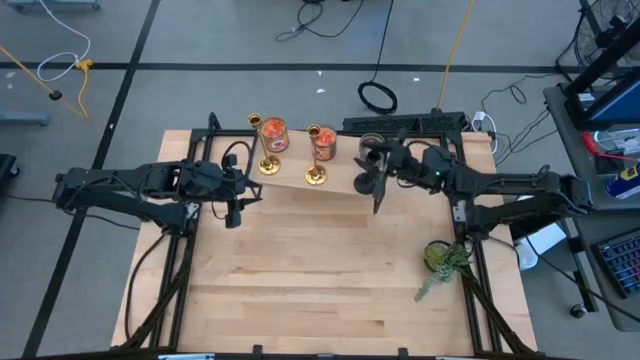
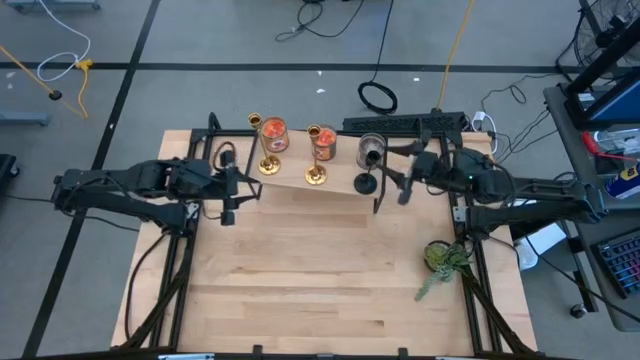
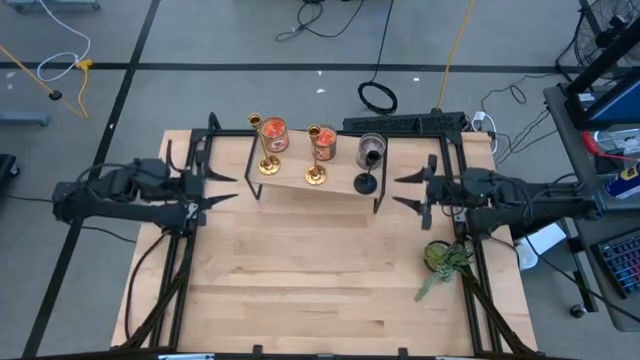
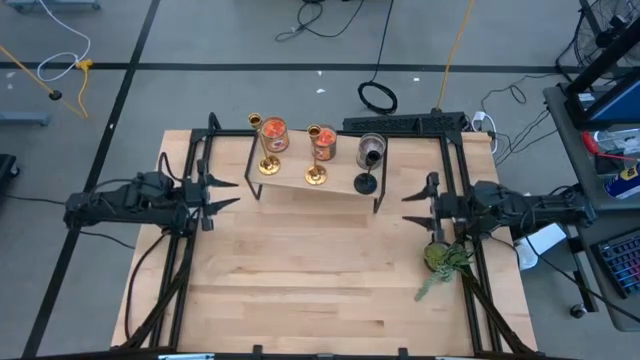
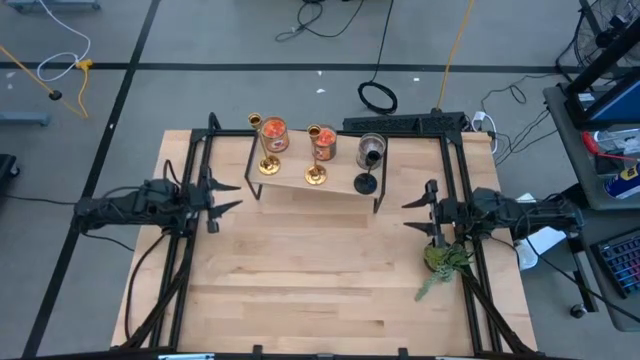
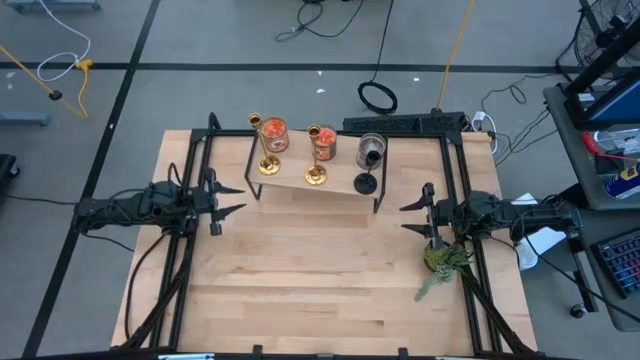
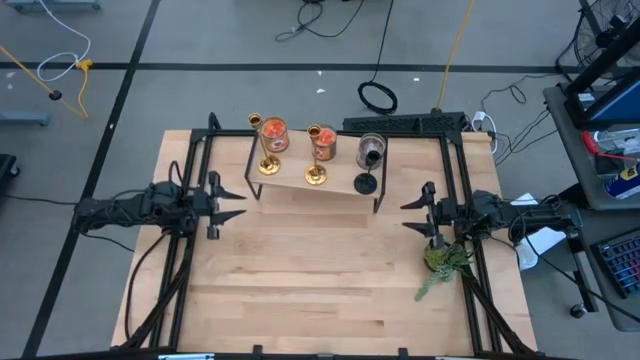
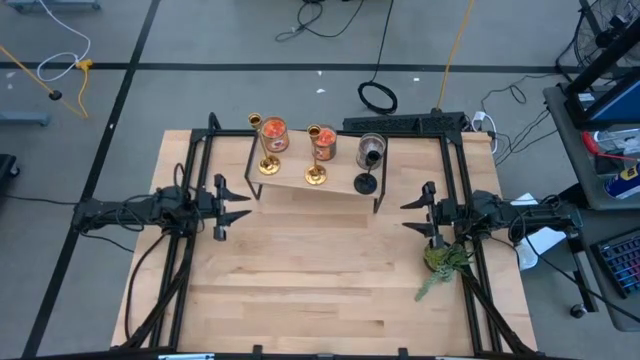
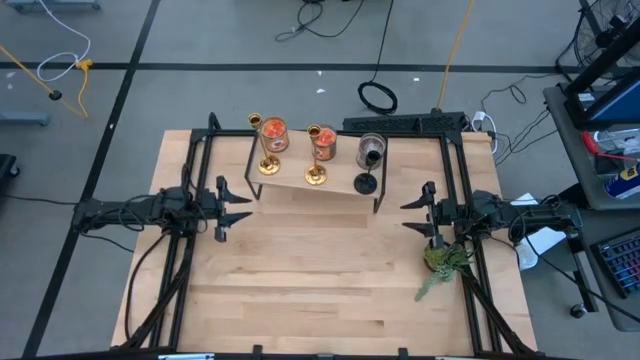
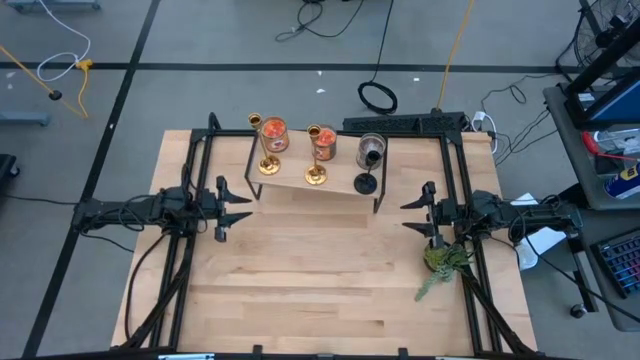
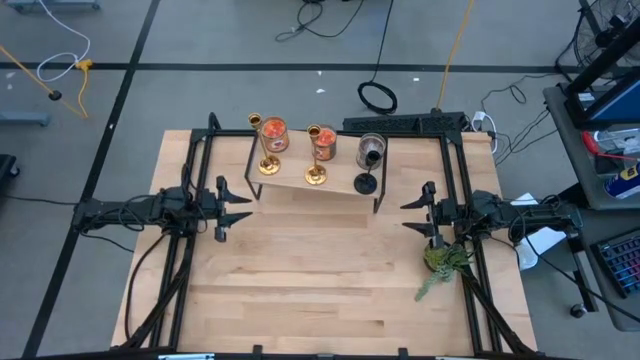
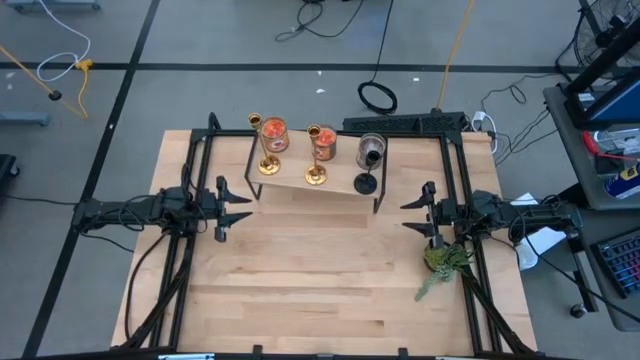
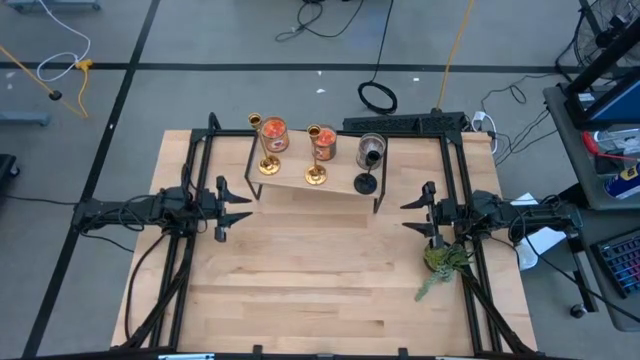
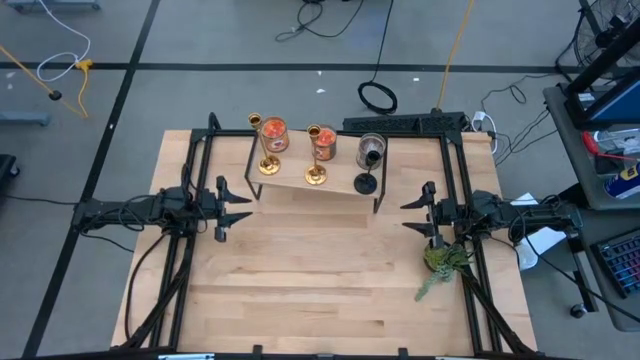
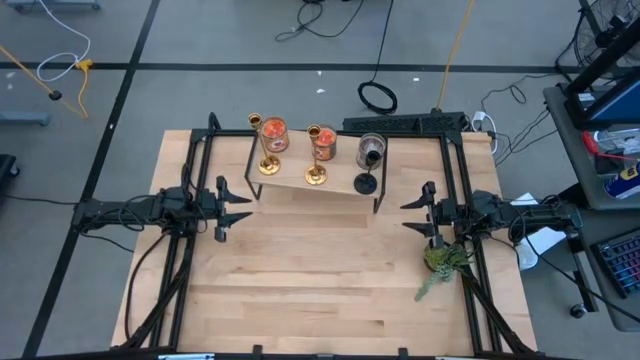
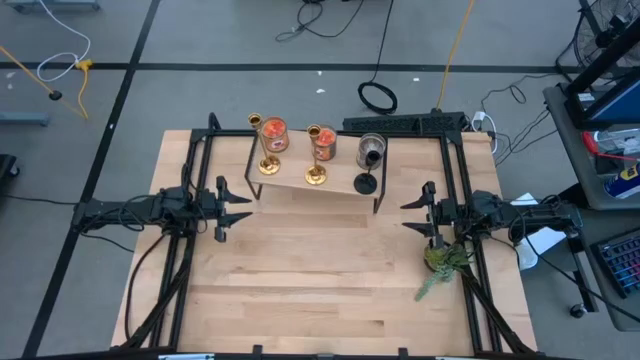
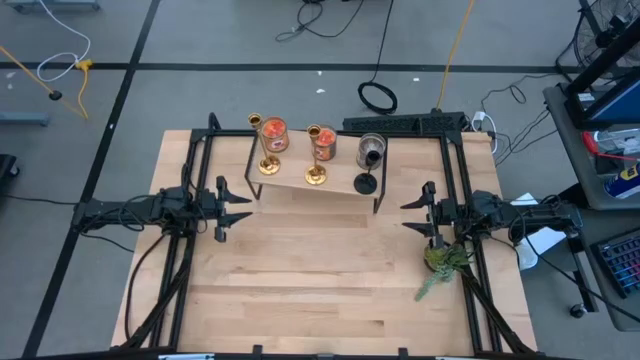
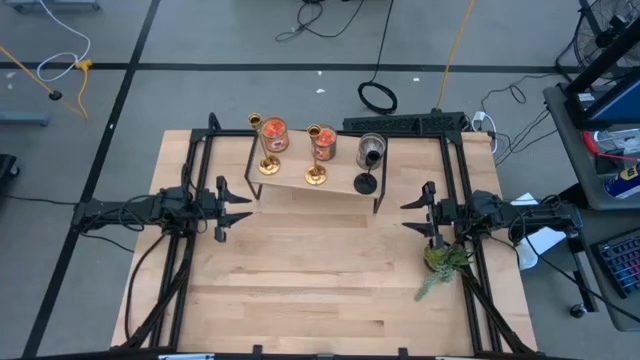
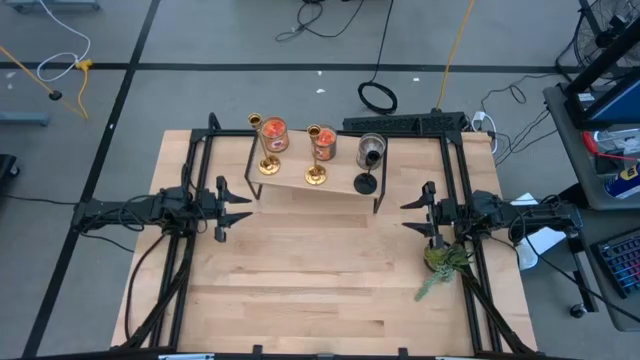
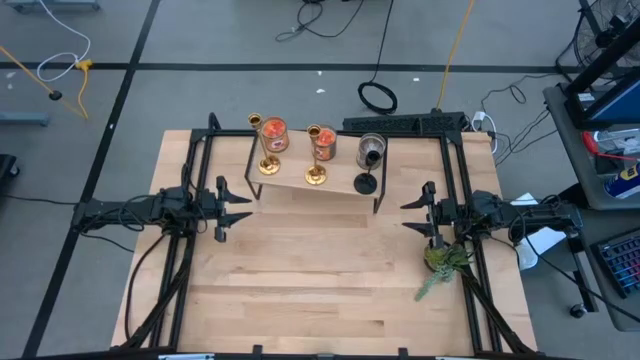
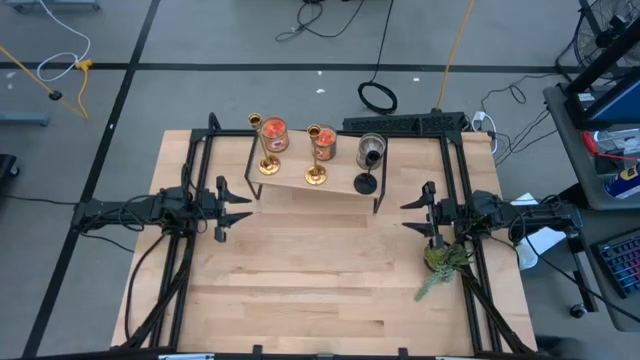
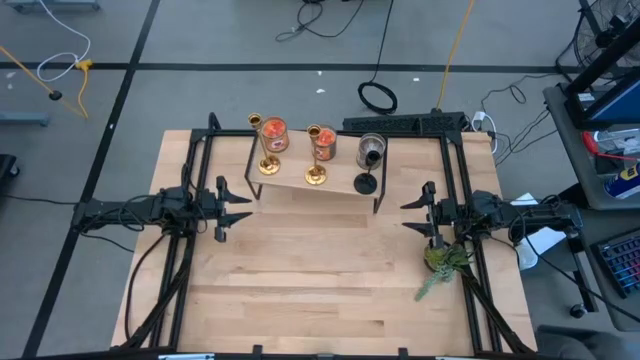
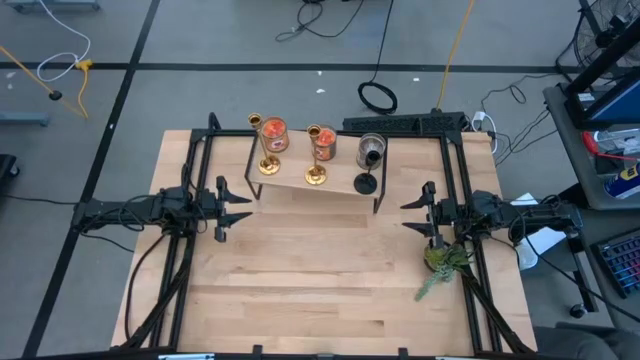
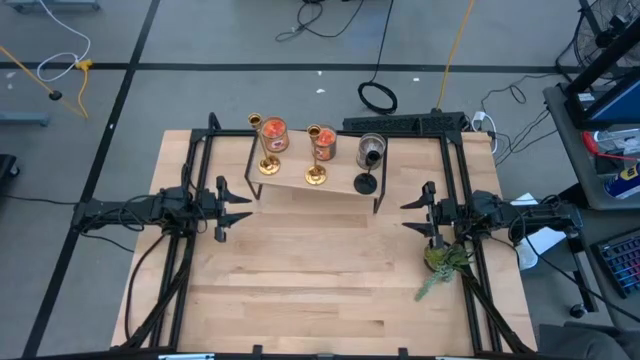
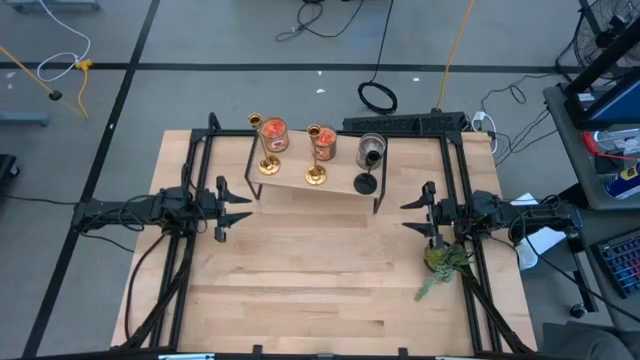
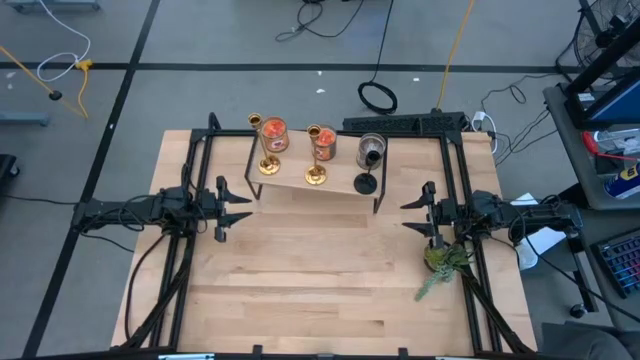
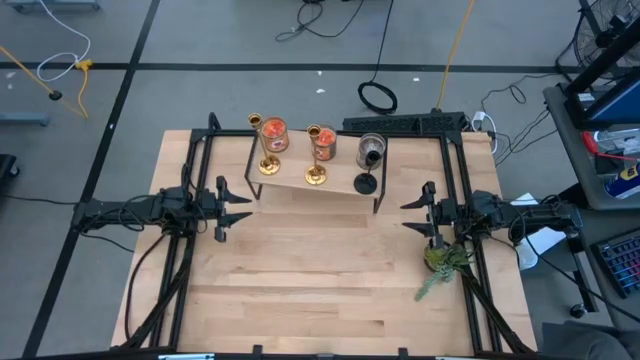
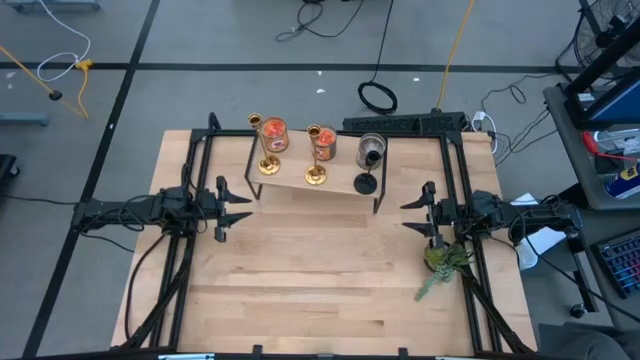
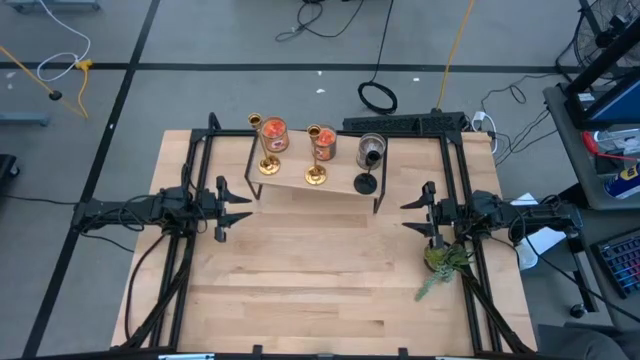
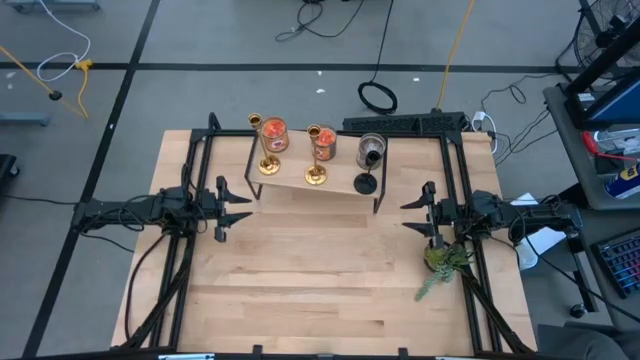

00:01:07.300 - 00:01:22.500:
Task: Pick & Place candle stick holders
Return to Home Position

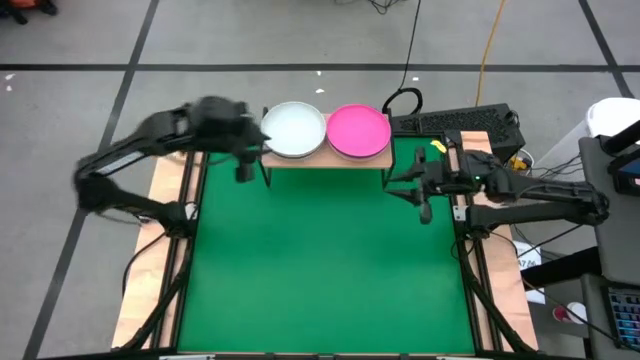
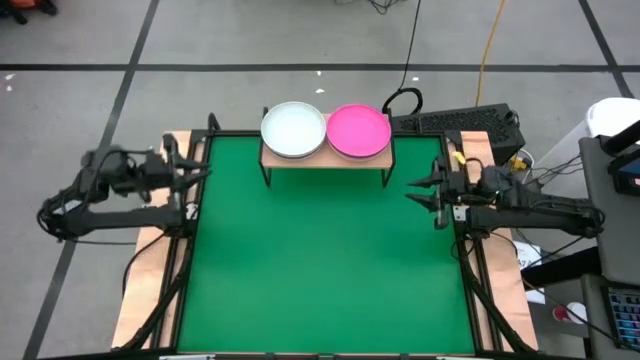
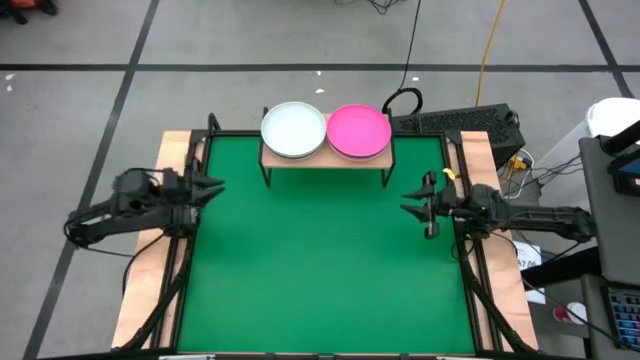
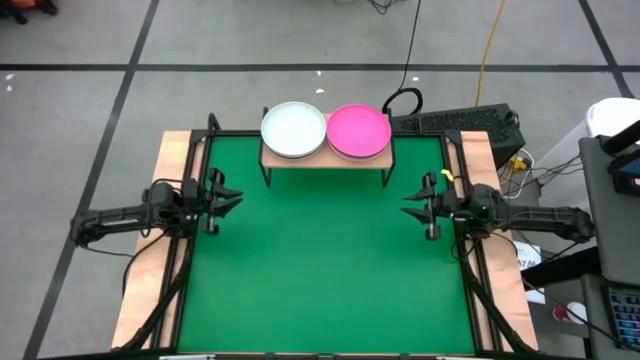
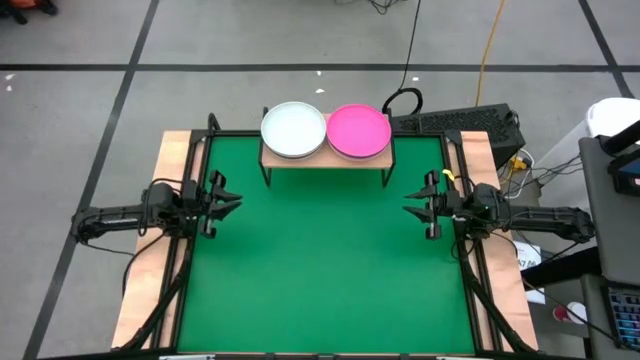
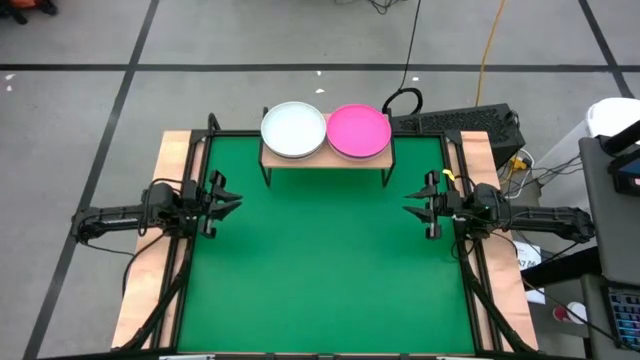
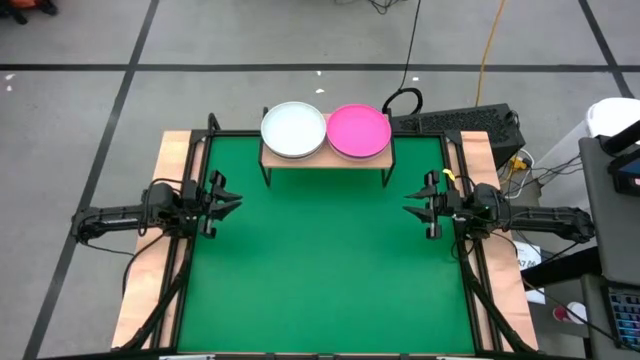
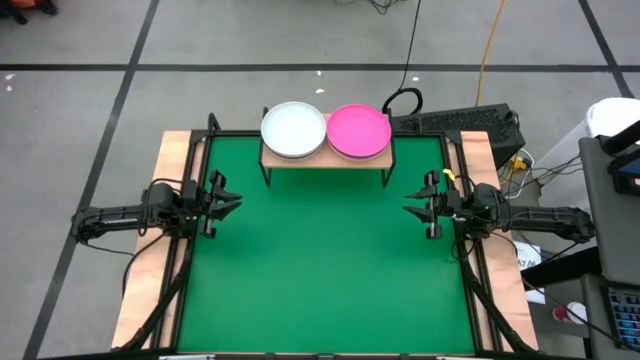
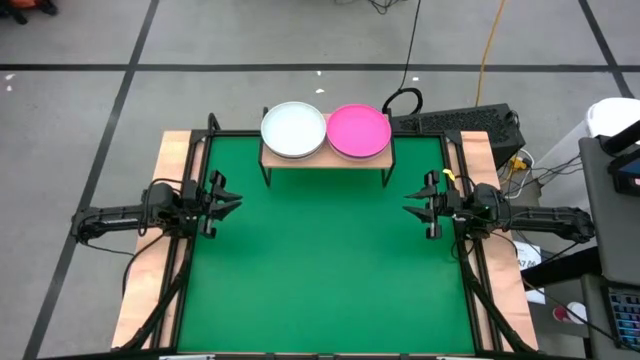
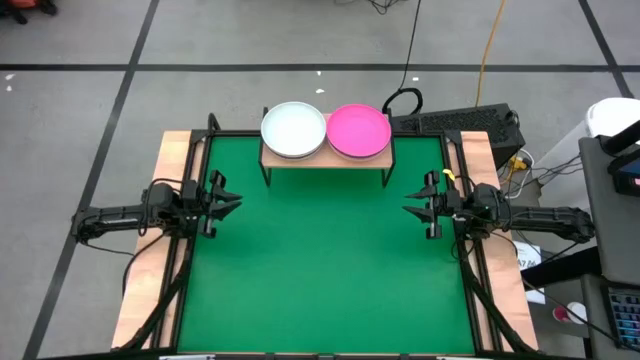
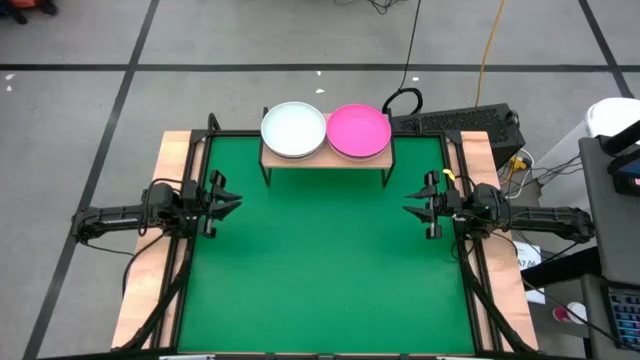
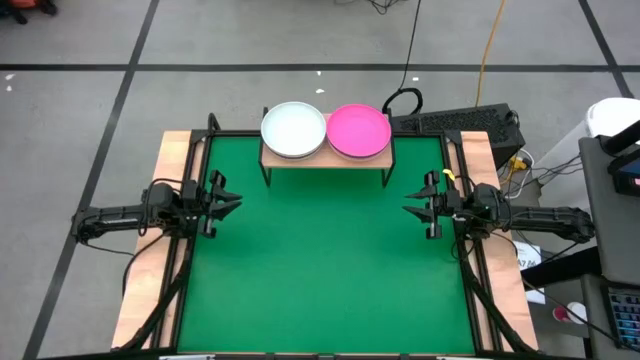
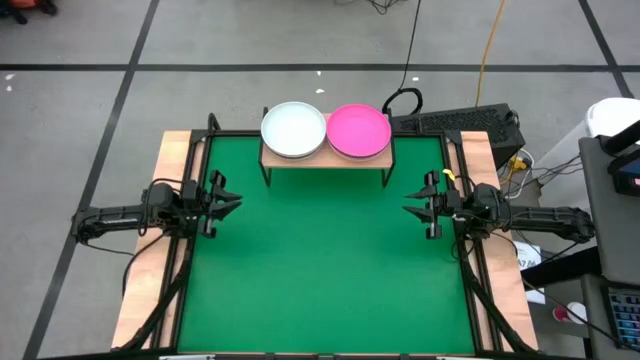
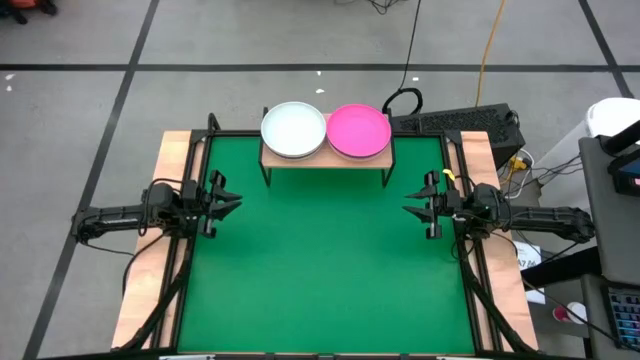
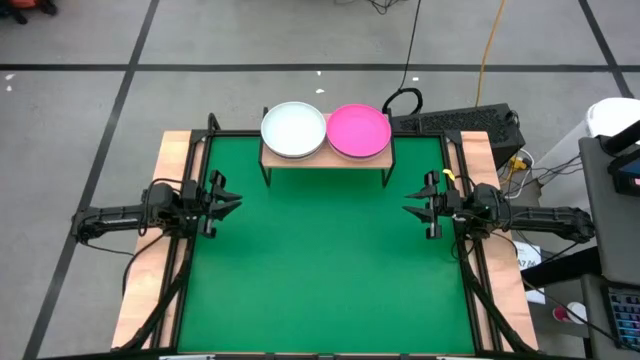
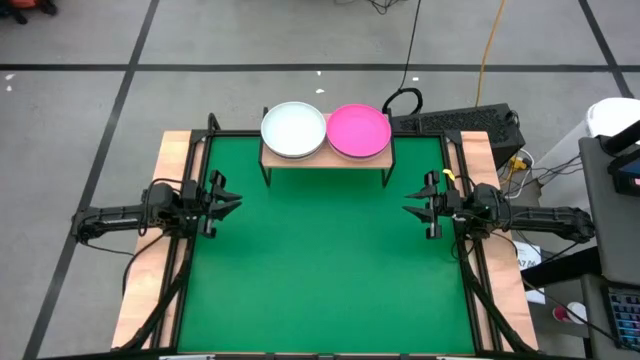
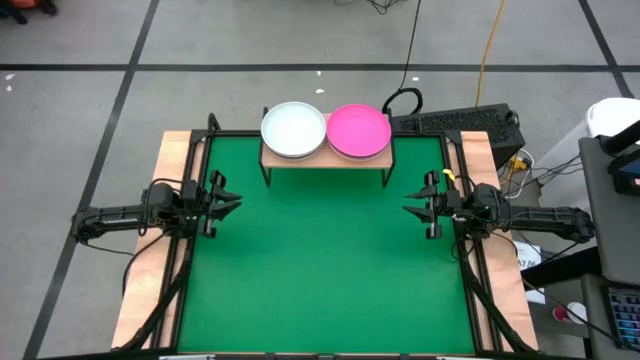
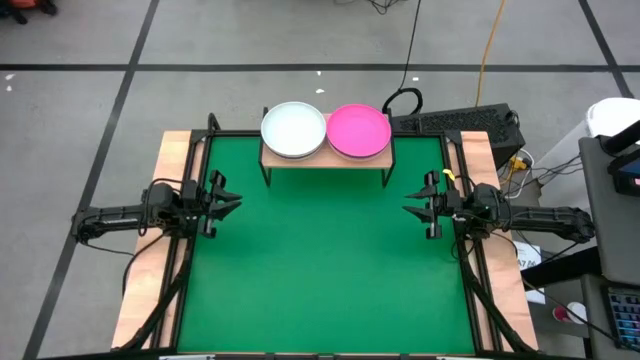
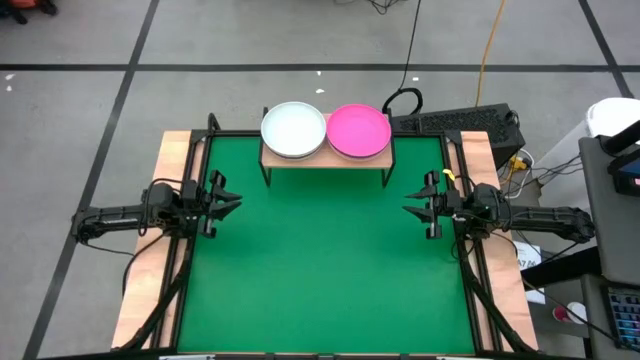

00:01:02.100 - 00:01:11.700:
Task: Place and stack plates onto a shelf
Return to Home Position
